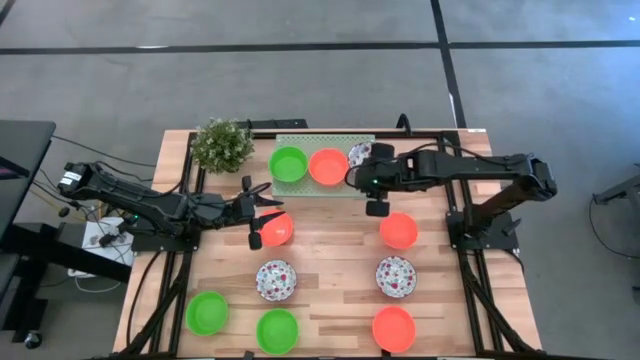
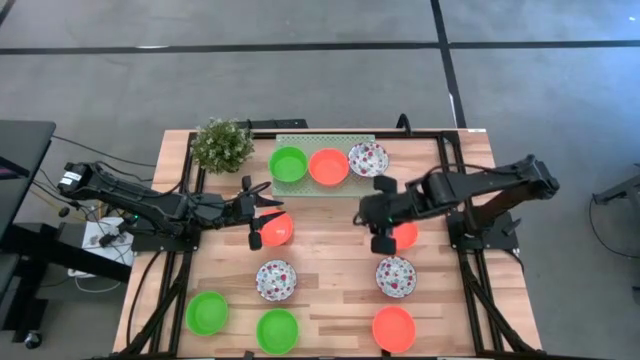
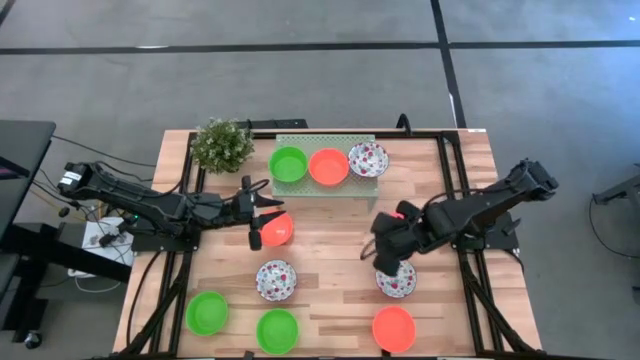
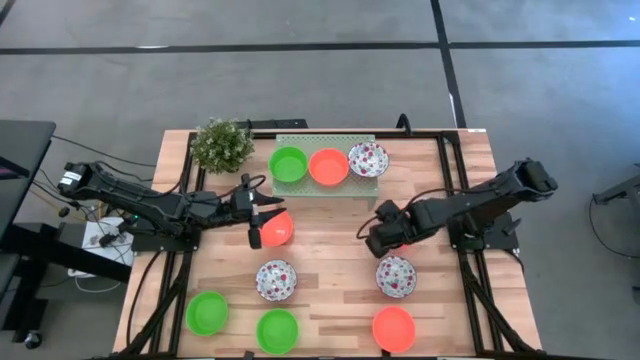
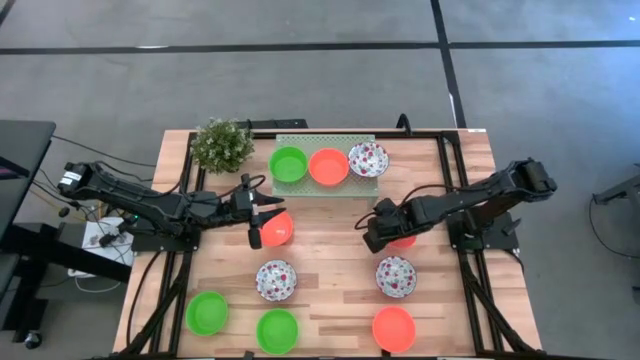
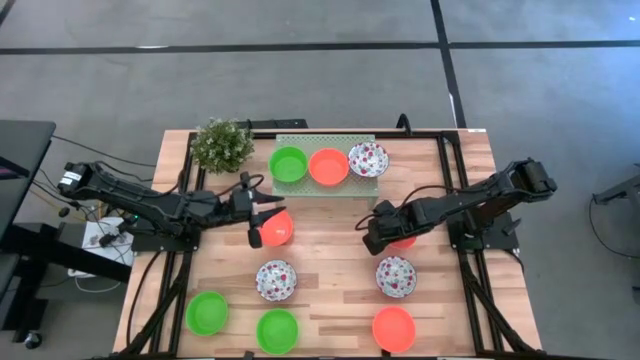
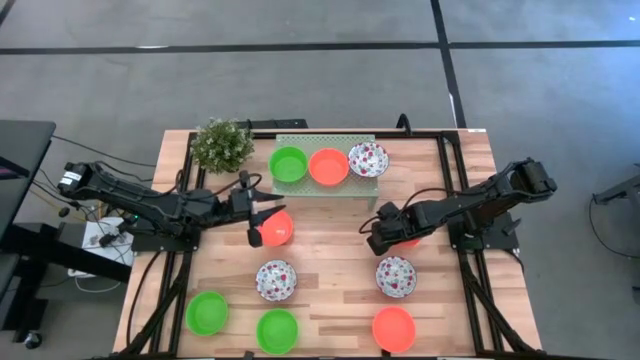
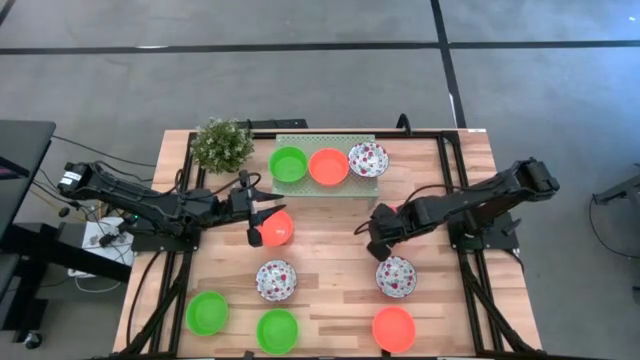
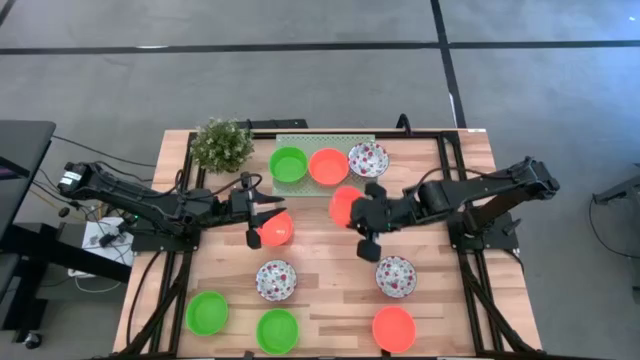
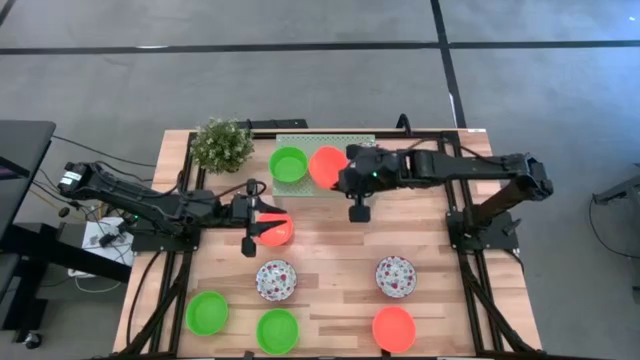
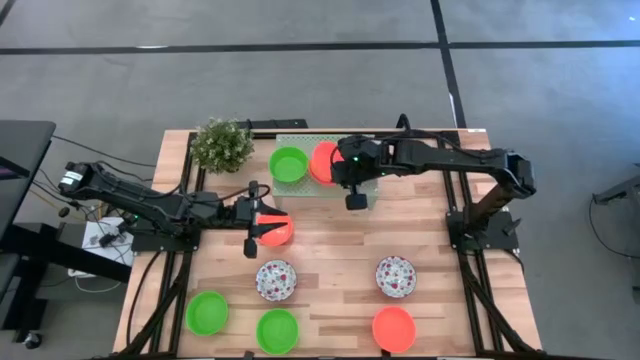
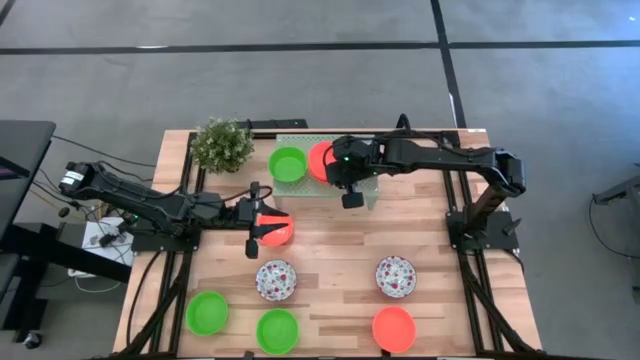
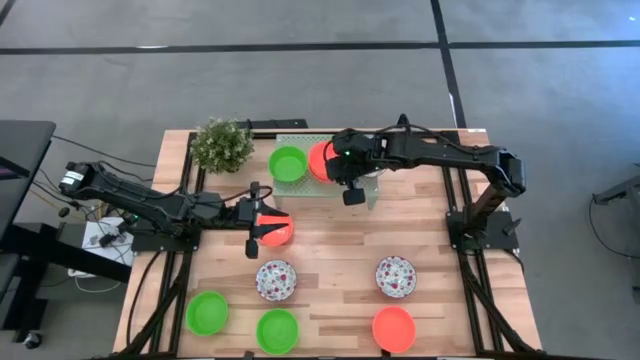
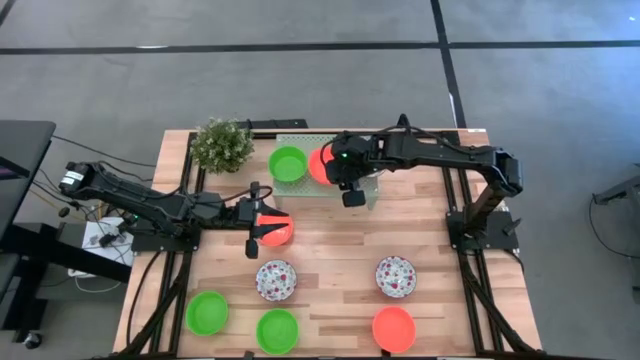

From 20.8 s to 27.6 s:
Task: Pick & Place Mini bowls
Stack the orange bowl on the orange bowl on the shelf

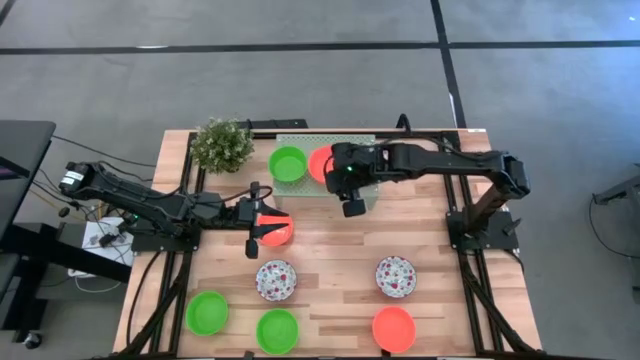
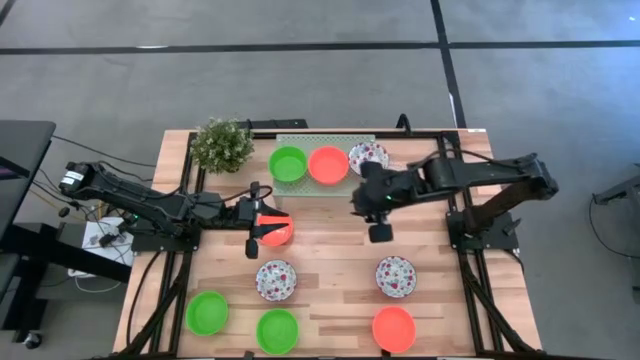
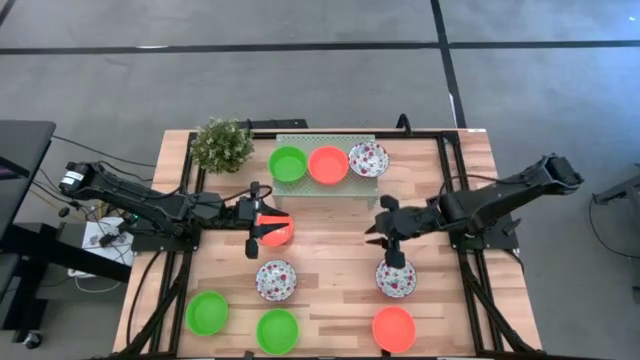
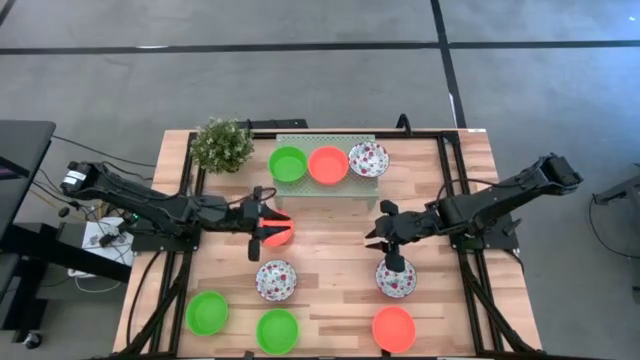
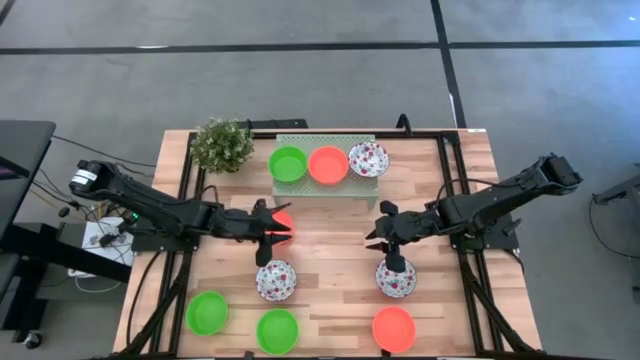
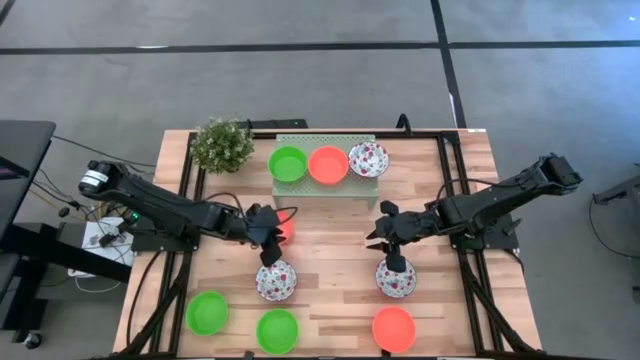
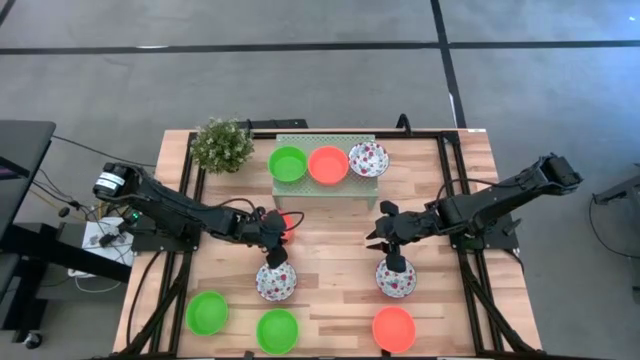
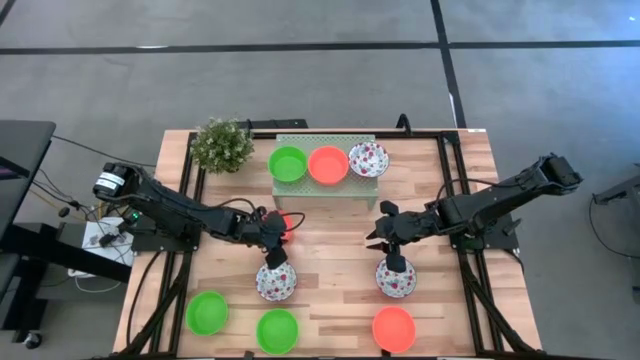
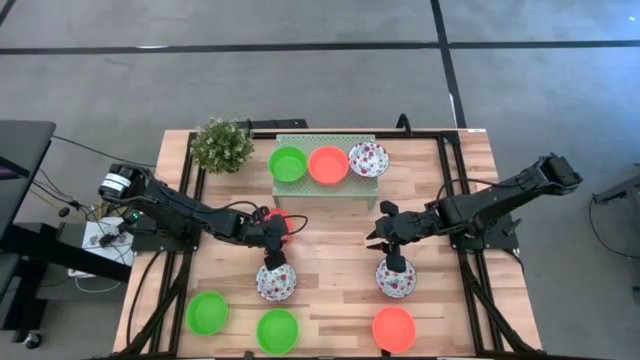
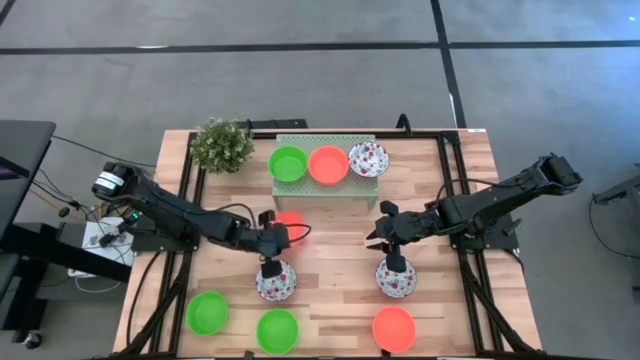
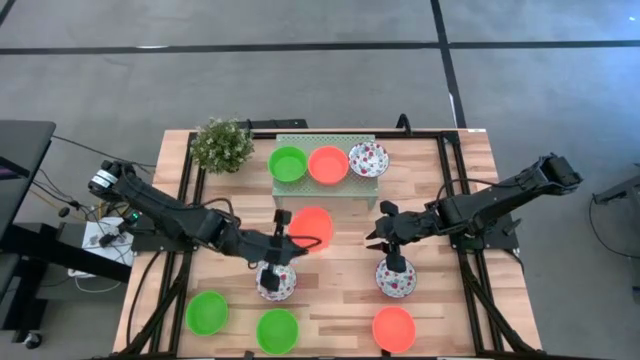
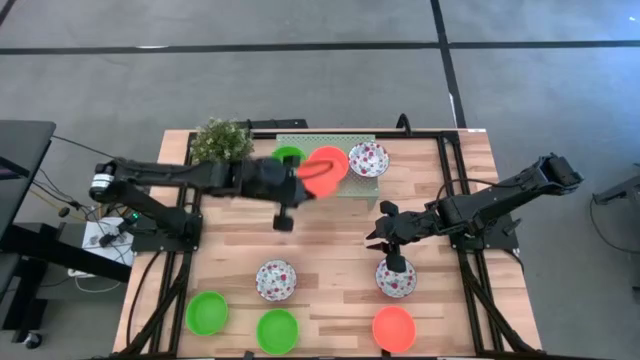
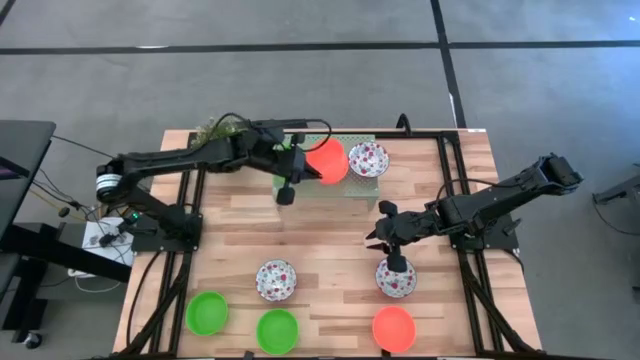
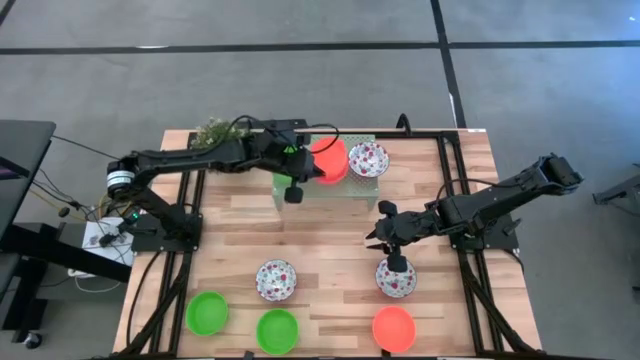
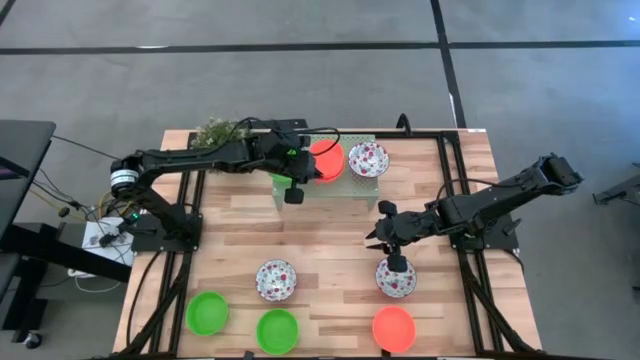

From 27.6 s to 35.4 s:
Stack the orange bowl on the orange bowl on the shelf

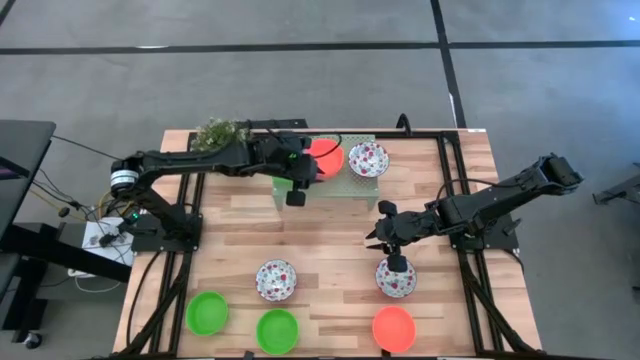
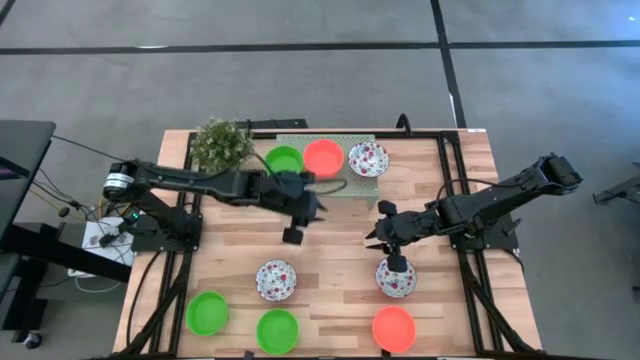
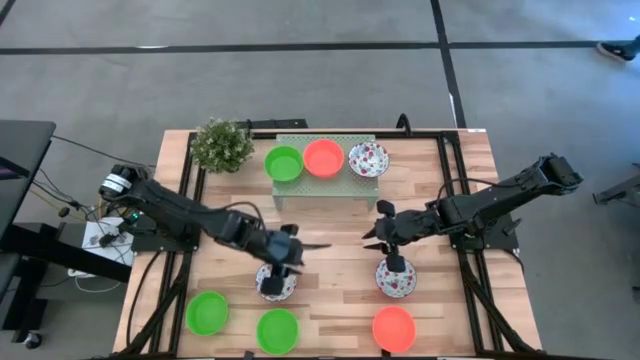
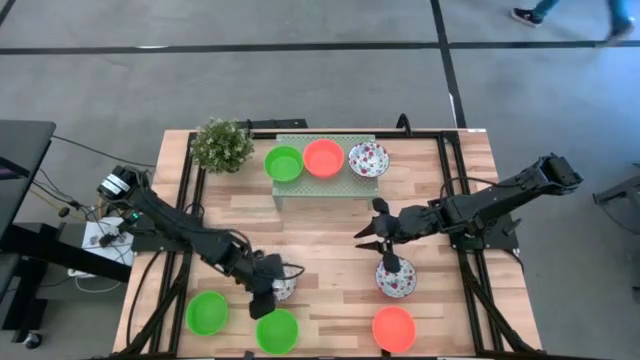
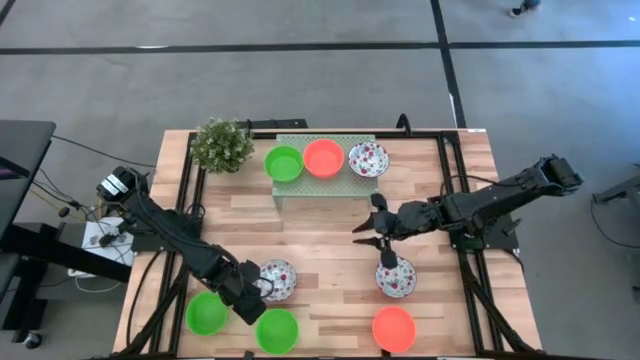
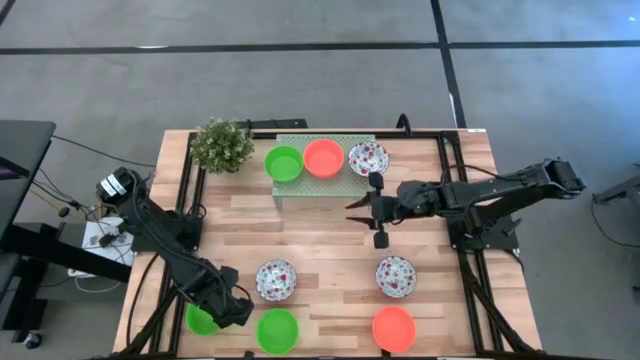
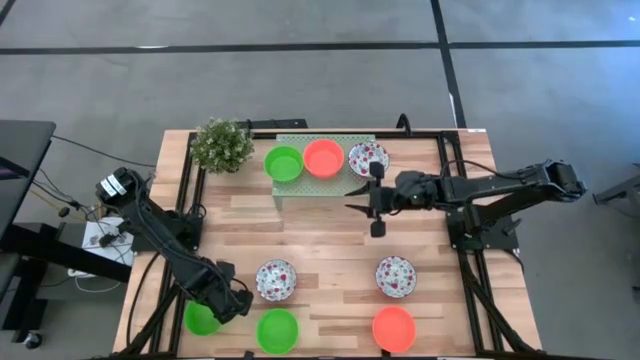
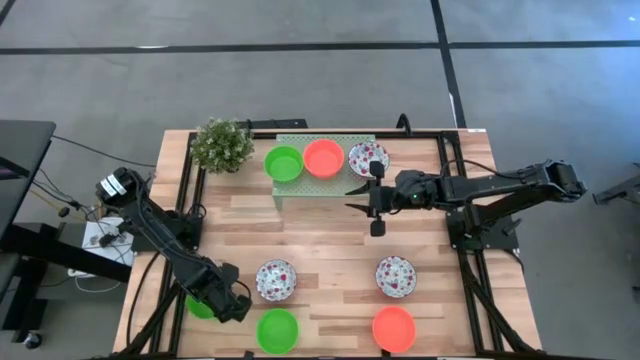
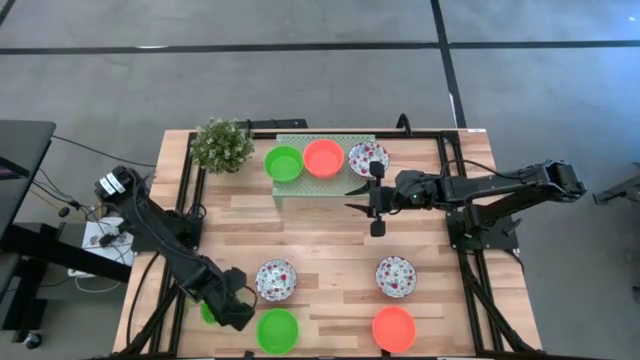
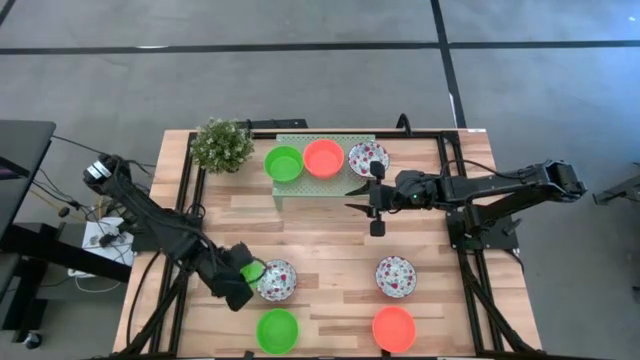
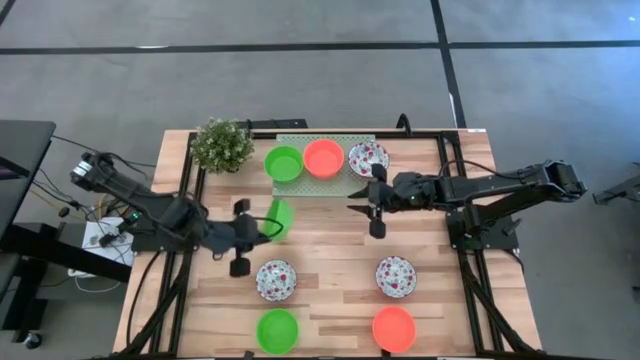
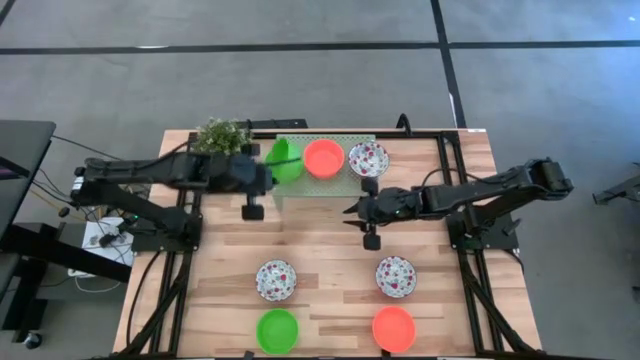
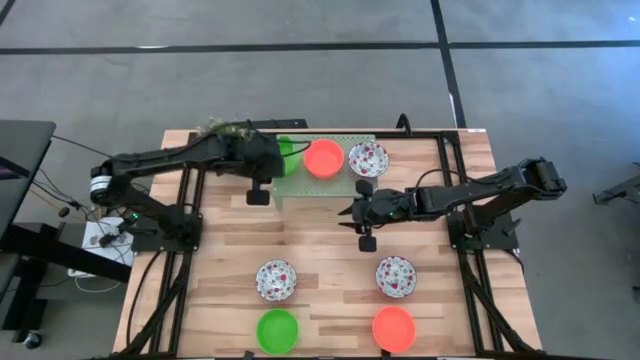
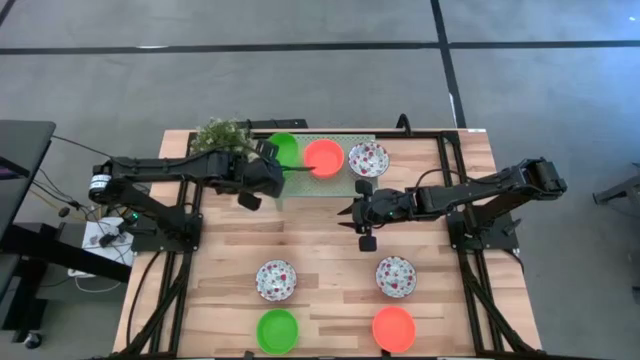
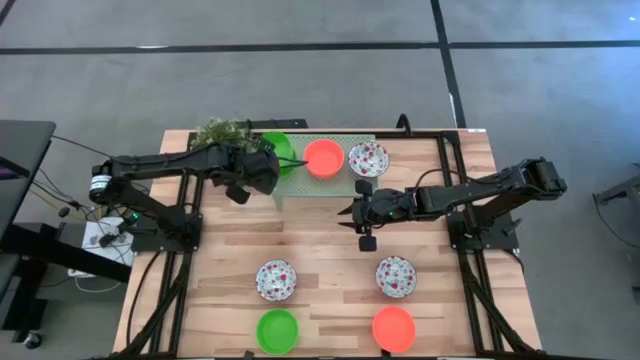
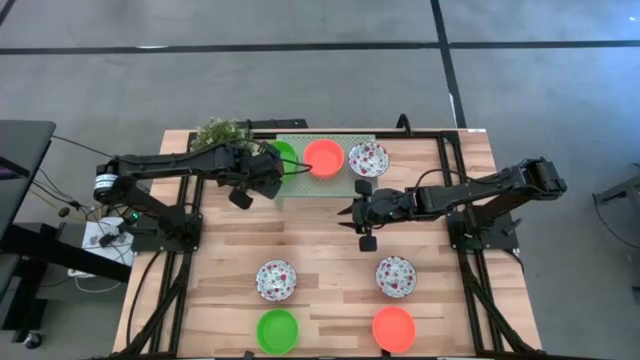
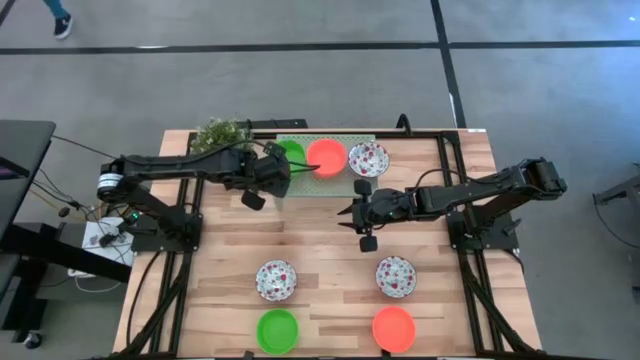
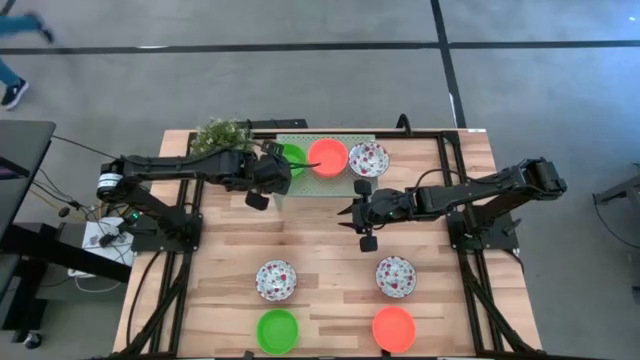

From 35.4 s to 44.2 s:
Stack the green bowl on the green bowl on the shelf
